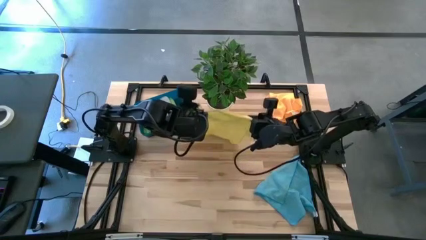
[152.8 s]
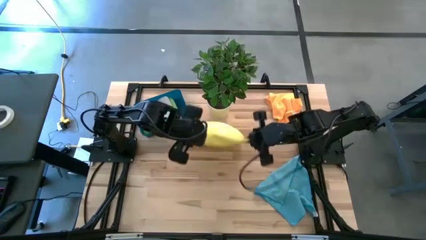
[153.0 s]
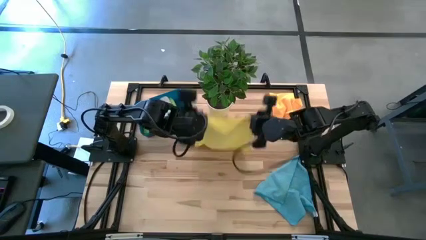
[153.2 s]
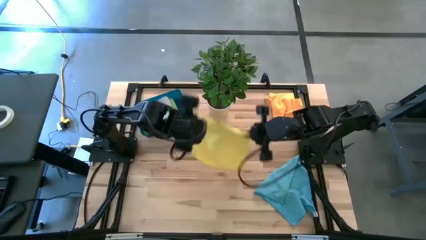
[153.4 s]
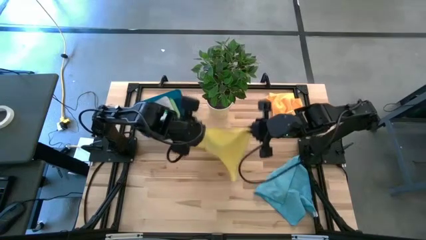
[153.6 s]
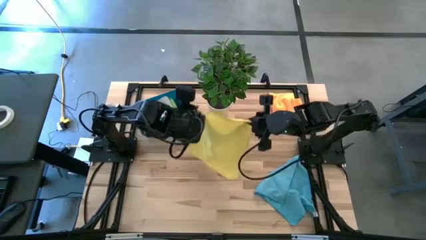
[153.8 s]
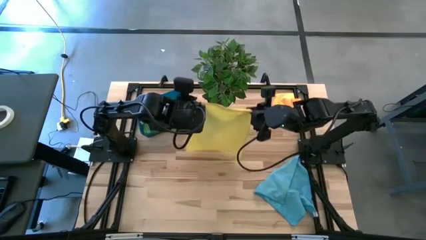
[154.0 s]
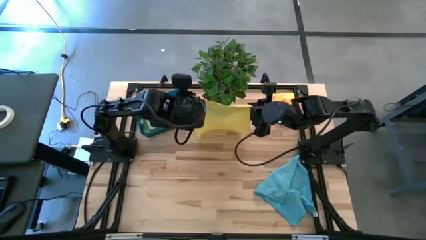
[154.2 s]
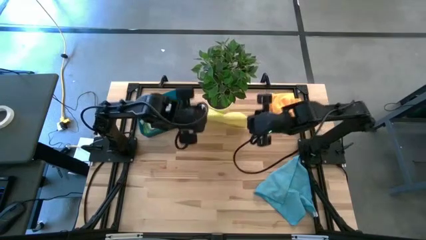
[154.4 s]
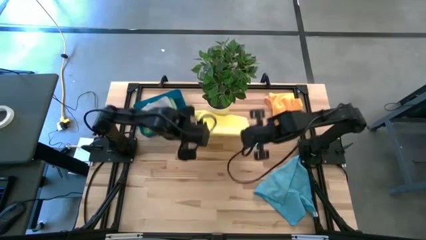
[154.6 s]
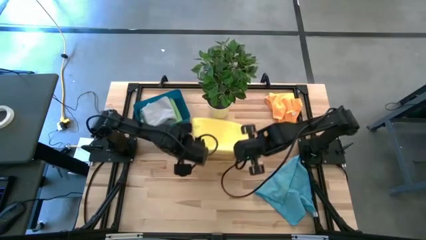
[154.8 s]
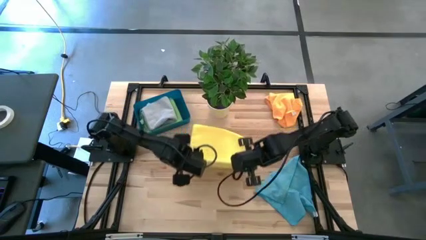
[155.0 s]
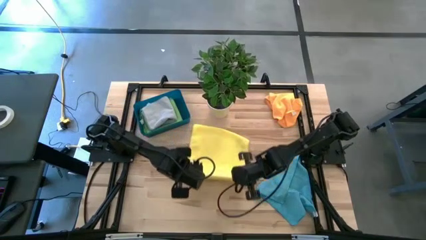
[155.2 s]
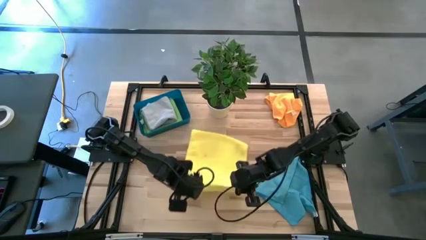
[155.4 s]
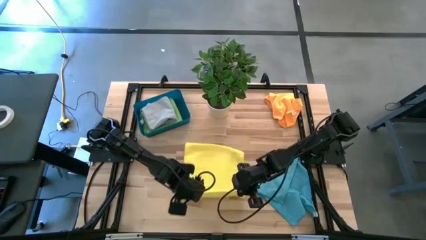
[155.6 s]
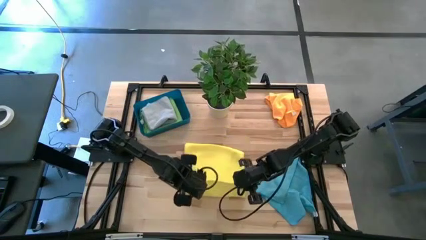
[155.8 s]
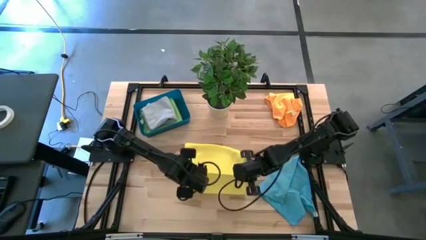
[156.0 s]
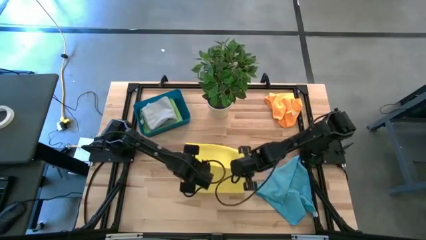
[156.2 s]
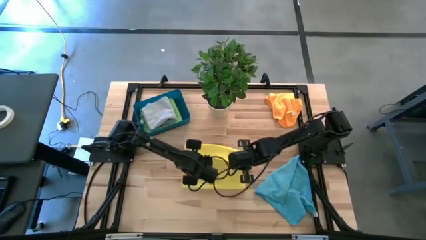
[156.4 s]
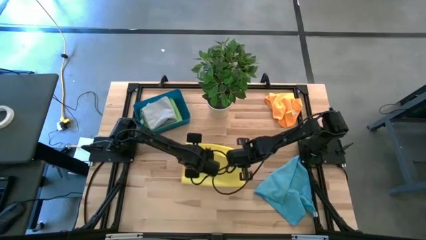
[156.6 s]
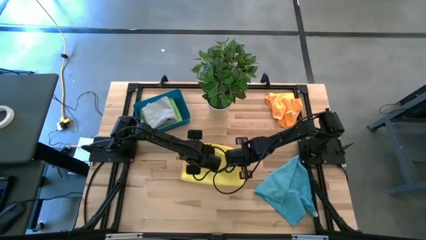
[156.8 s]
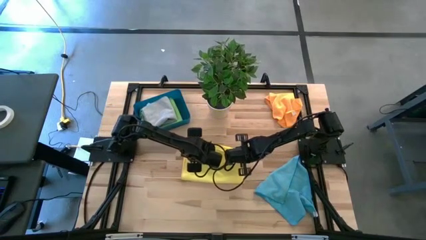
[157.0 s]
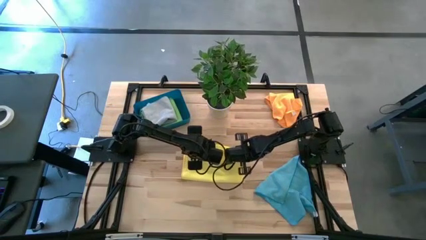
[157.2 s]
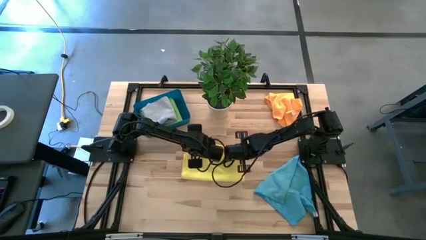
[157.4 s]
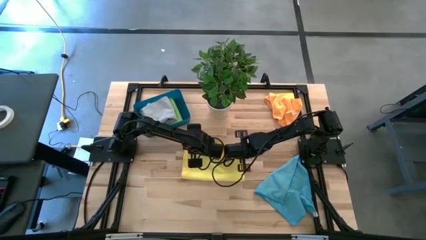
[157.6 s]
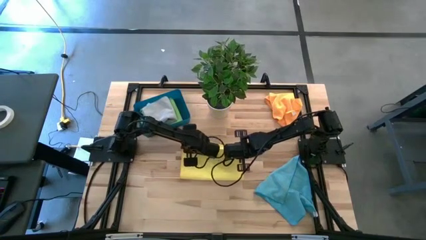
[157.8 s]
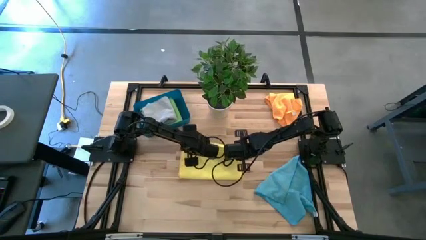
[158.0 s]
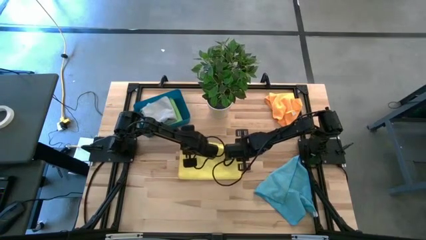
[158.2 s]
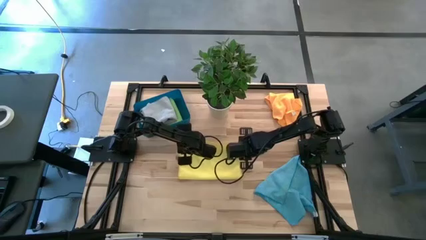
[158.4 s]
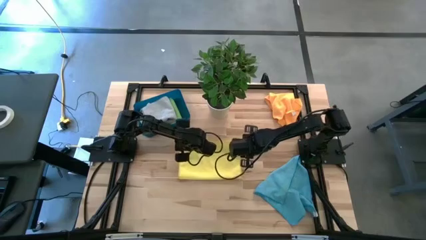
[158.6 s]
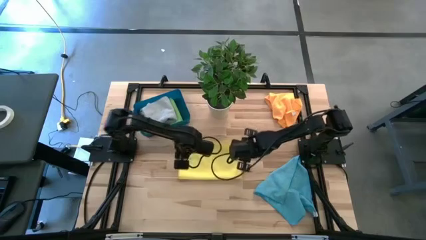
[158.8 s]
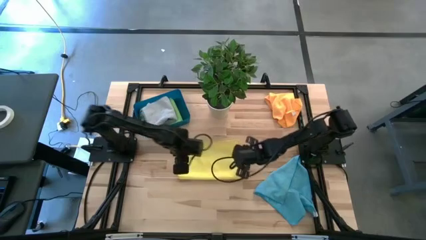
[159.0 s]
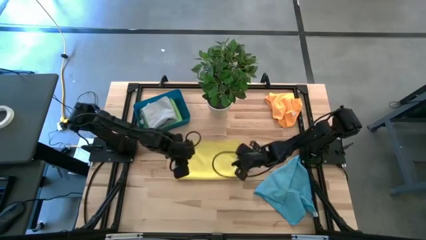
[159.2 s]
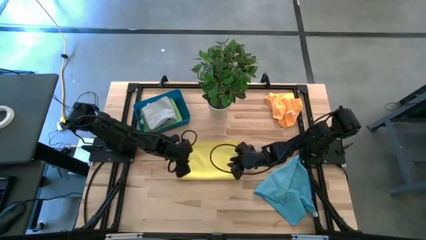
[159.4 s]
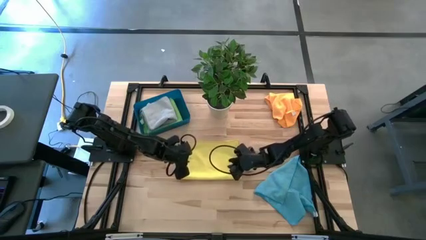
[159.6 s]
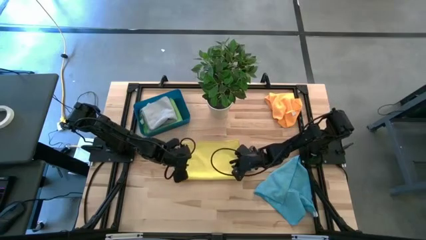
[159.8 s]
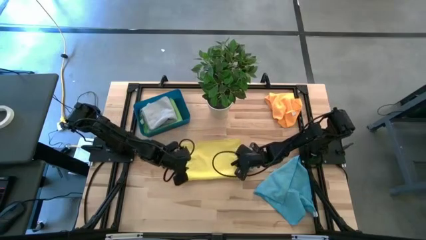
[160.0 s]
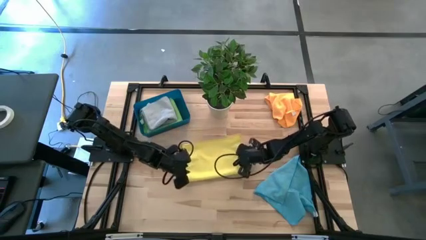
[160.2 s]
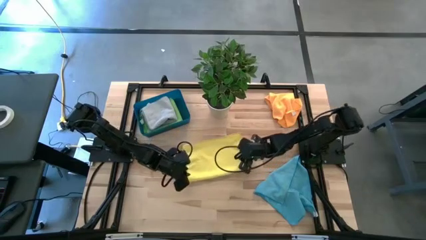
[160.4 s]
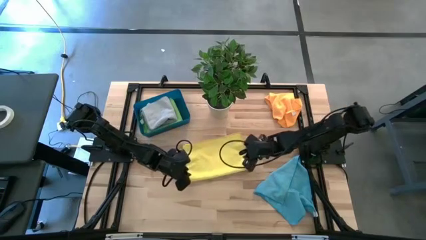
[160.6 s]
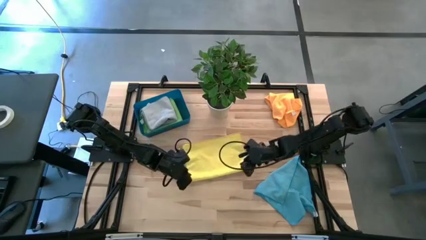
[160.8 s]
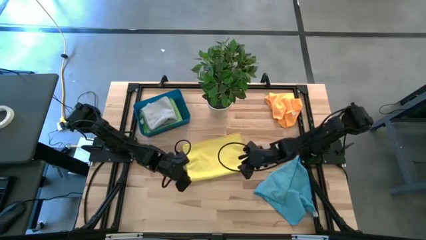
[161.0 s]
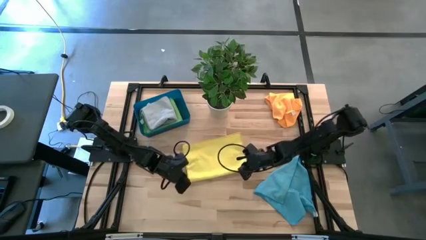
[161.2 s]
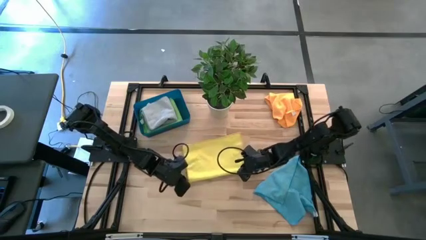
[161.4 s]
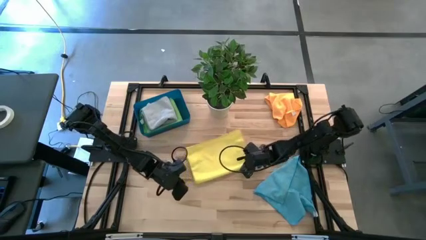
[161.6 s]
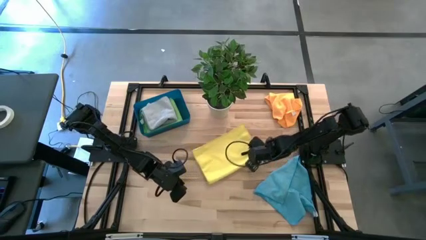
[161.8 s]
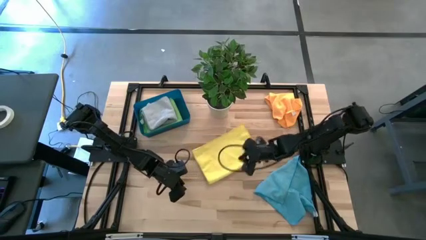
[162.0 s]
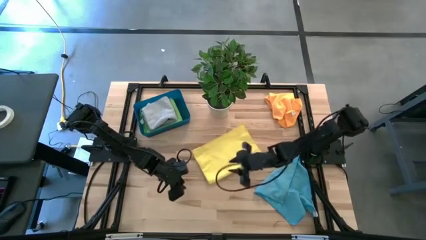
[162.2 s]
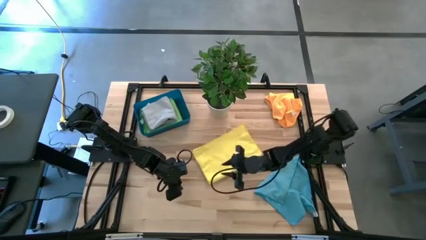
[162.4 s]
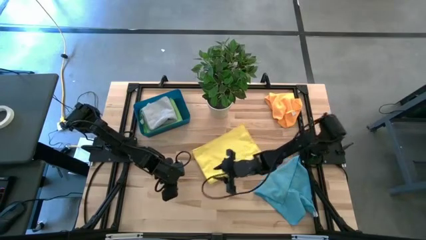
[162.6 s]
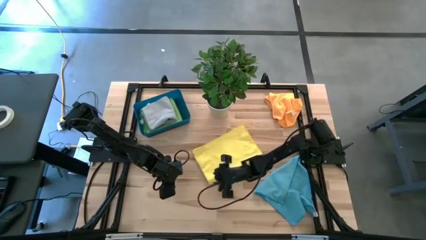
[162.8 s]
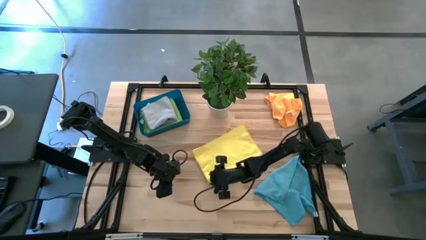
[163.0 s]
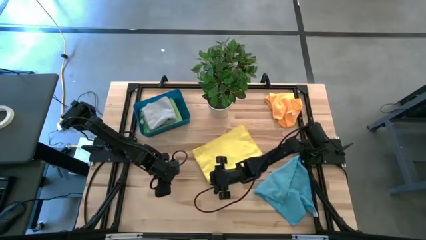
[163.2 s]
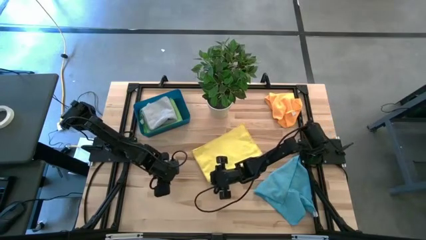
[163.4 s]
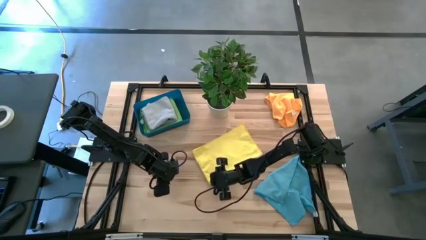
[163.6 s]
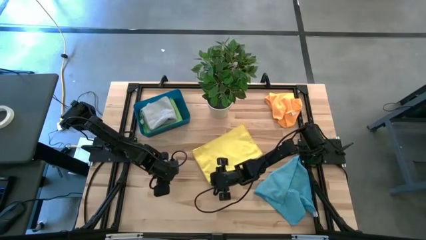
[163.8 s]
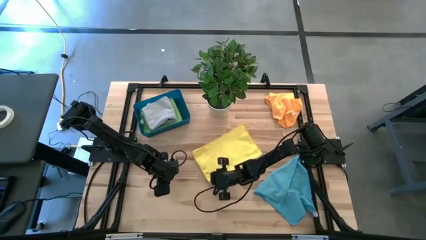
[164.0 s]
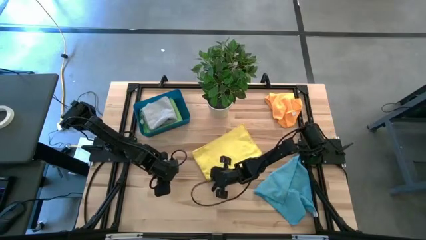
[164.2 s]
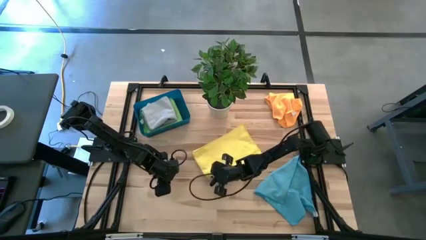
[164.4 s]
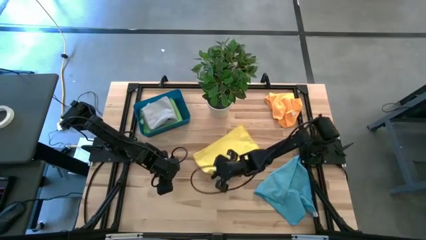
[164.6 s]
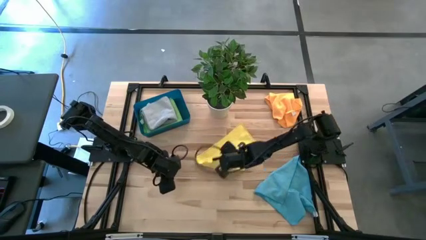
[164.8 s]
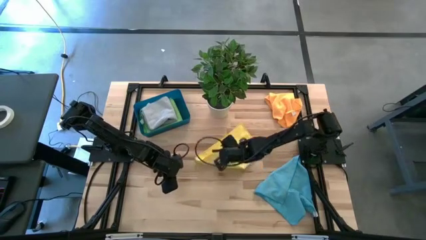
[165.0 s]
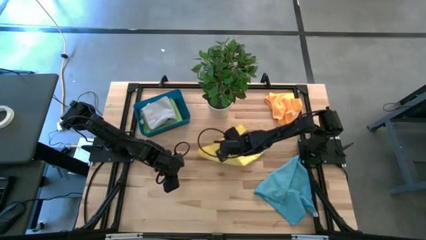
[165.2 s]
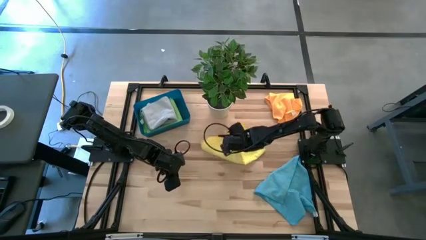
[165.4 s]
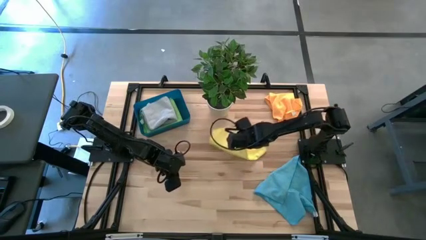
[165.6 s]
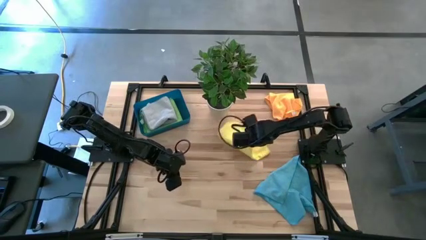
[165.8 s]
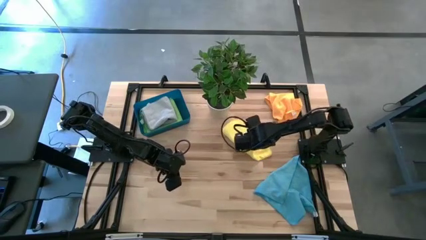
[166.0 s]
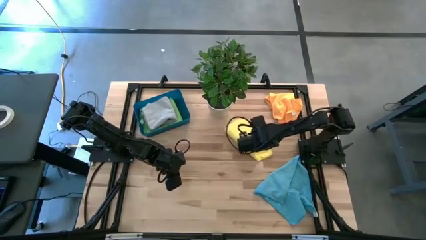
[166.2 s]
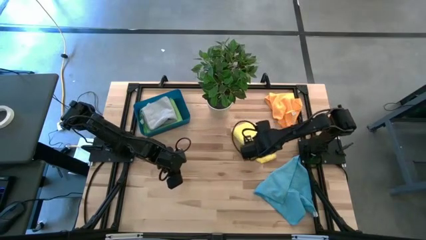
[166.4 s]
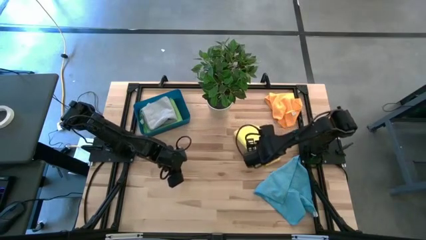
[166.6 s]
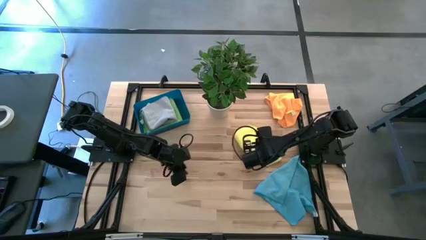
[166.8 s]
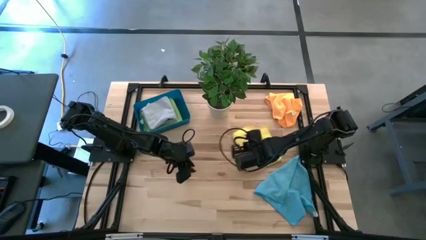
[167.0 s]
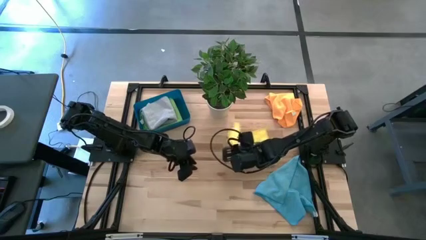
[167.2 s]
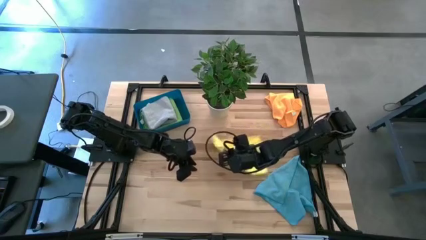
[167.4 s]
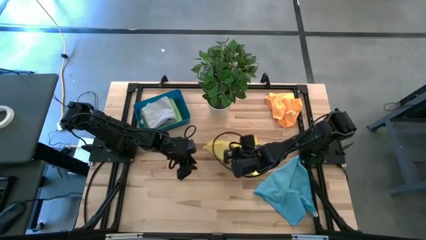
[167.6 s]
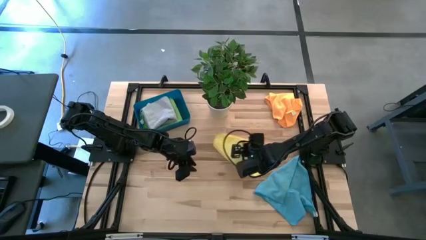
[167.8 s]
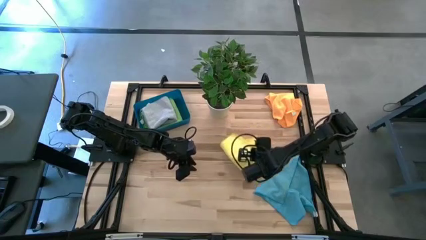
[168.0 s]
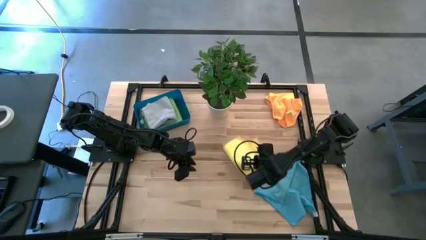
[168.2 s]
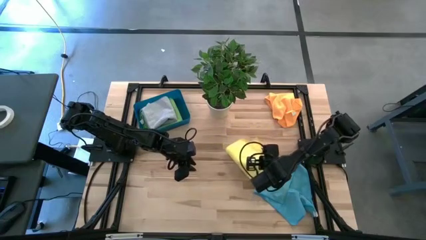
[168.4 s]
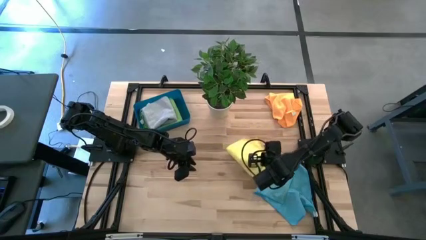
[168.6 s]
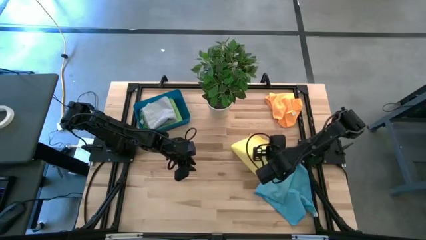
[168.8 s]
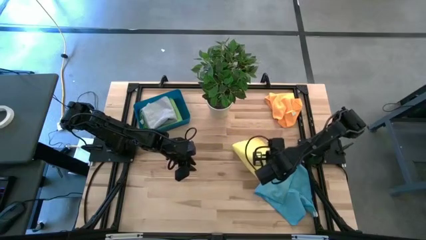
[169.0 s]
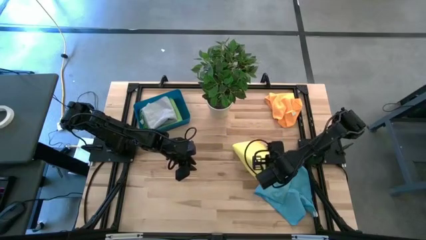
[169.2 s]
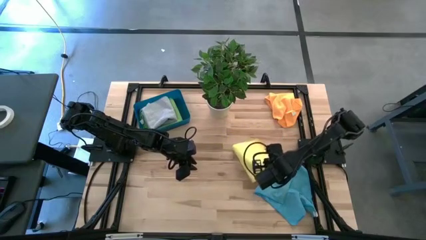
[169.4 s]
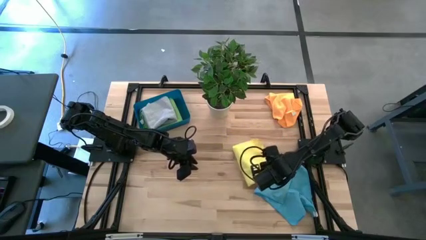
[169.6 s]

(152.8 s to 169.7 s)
Task: Fold microfiber towels
Fold the yellow towel
